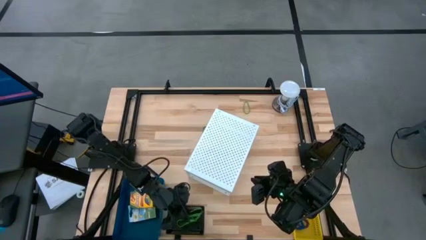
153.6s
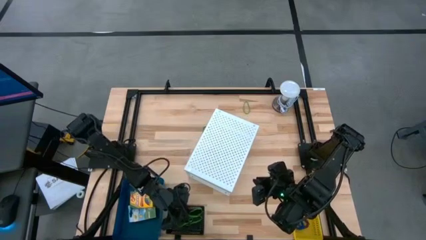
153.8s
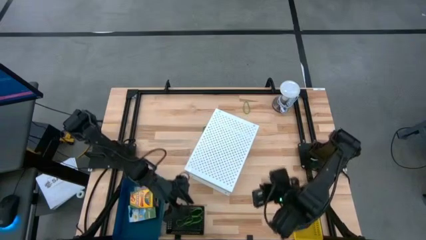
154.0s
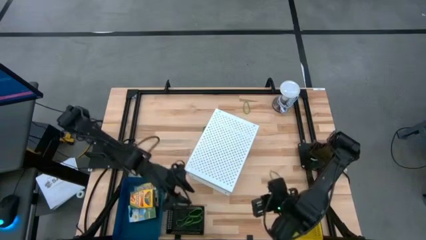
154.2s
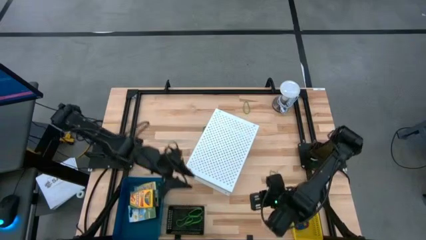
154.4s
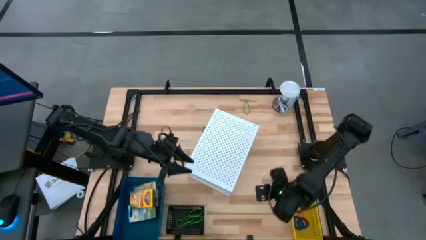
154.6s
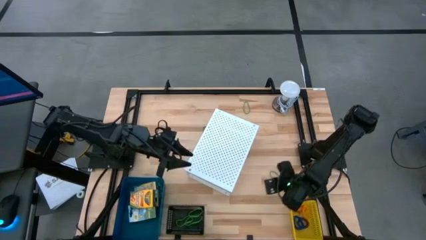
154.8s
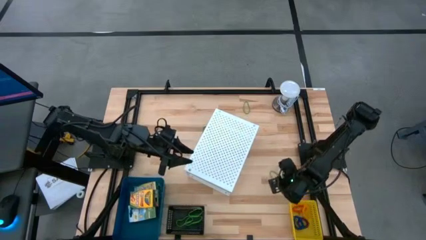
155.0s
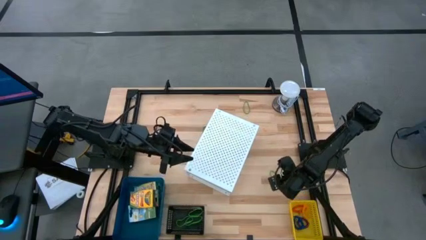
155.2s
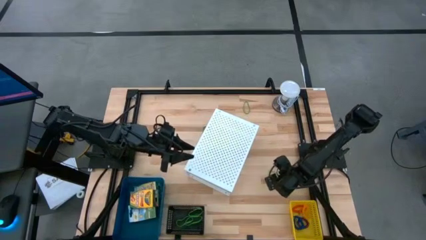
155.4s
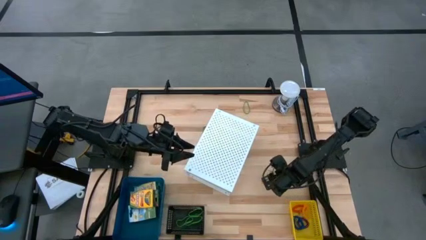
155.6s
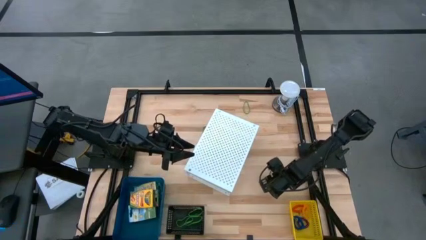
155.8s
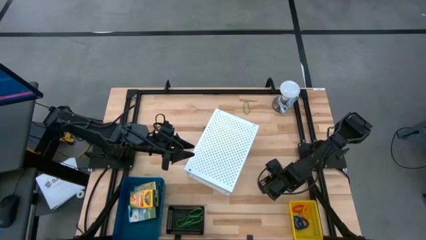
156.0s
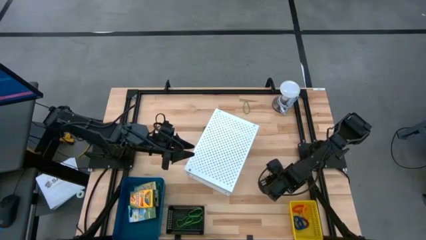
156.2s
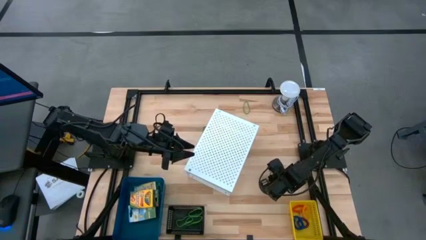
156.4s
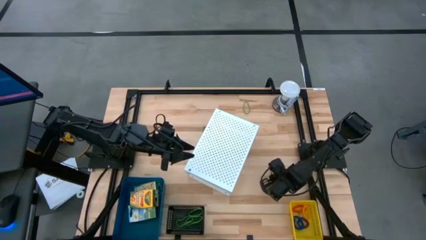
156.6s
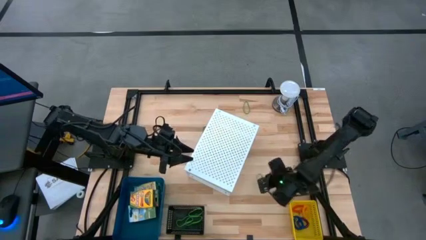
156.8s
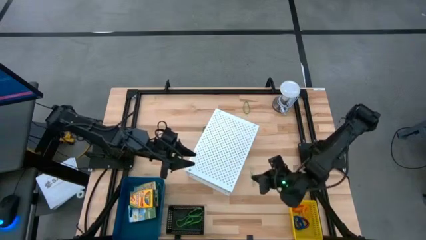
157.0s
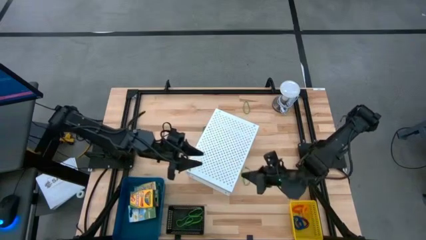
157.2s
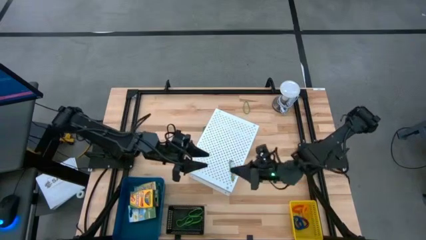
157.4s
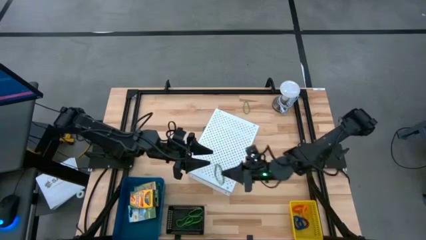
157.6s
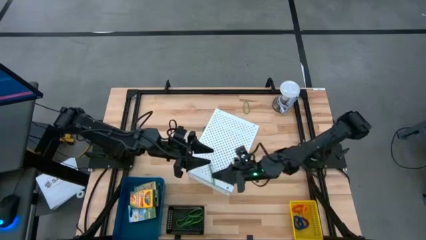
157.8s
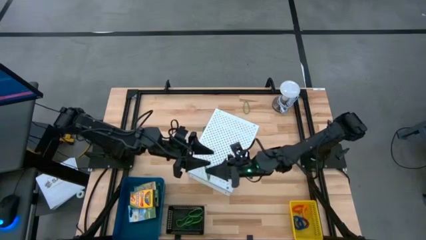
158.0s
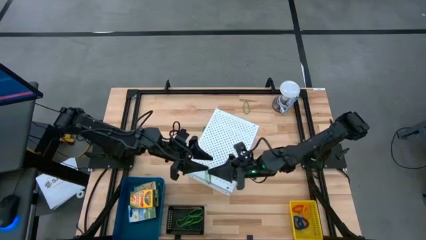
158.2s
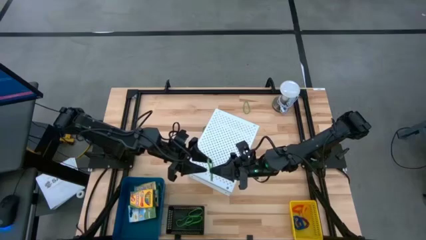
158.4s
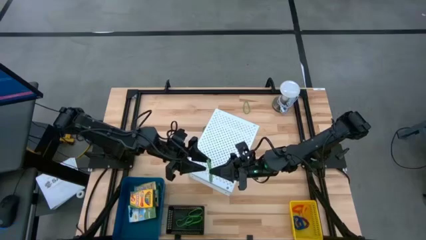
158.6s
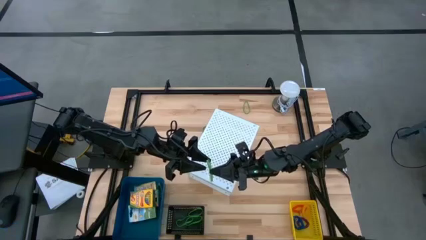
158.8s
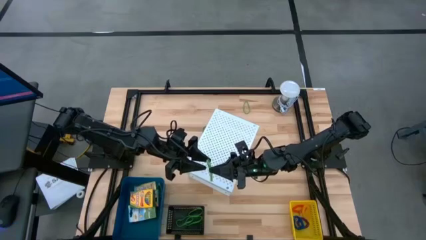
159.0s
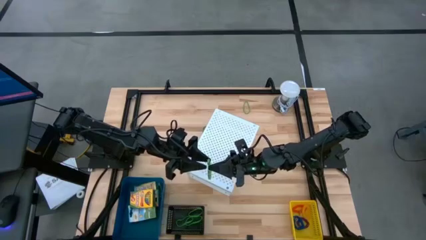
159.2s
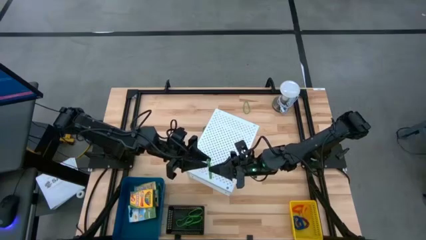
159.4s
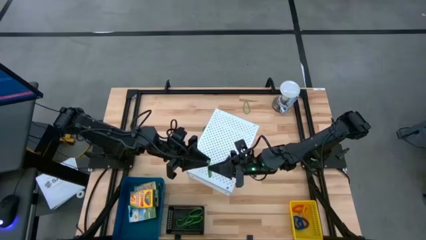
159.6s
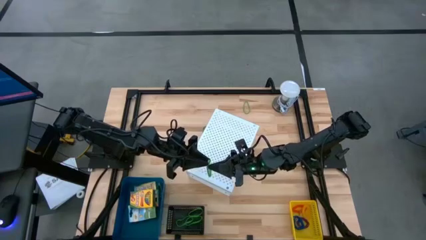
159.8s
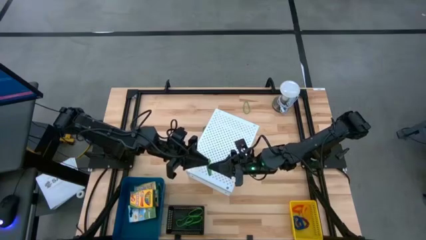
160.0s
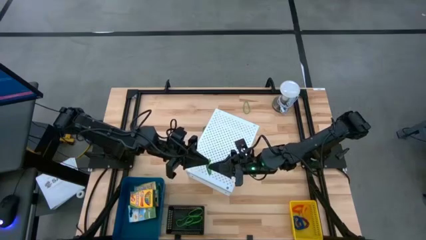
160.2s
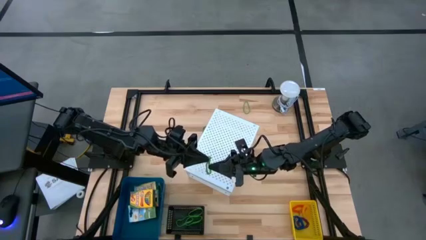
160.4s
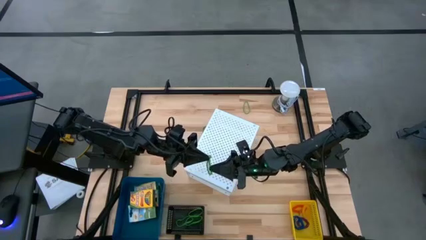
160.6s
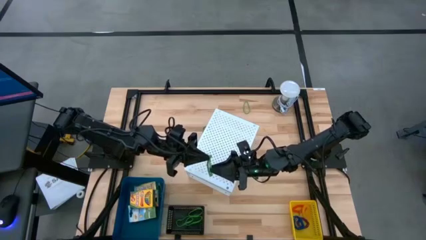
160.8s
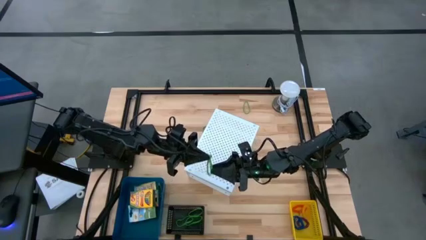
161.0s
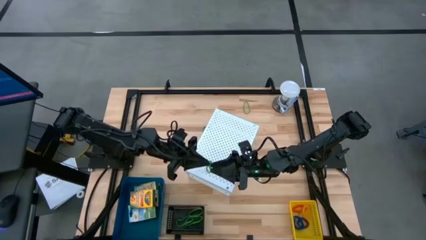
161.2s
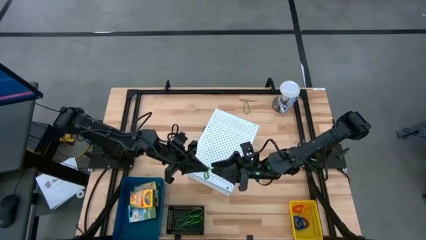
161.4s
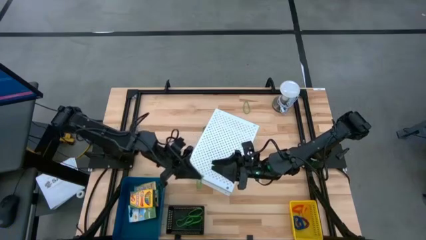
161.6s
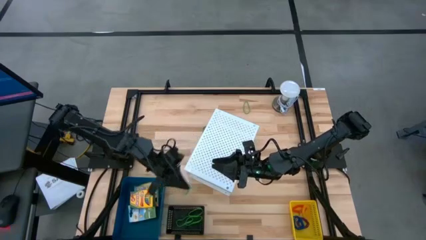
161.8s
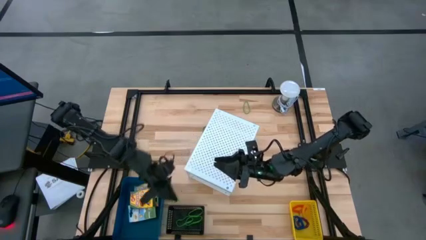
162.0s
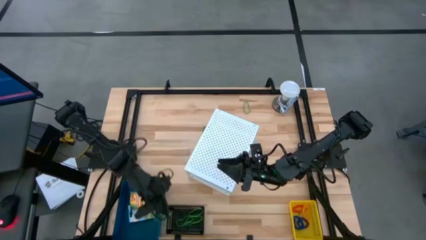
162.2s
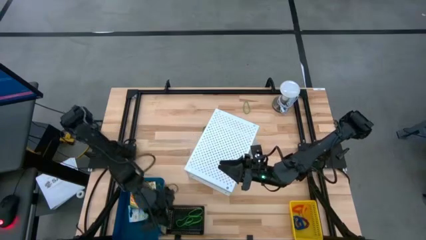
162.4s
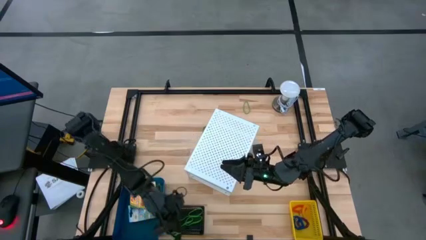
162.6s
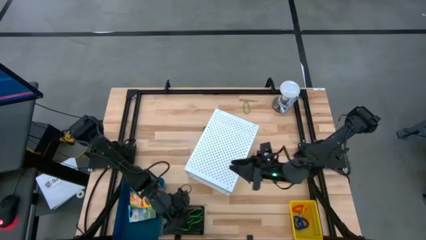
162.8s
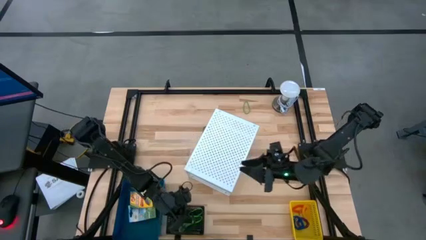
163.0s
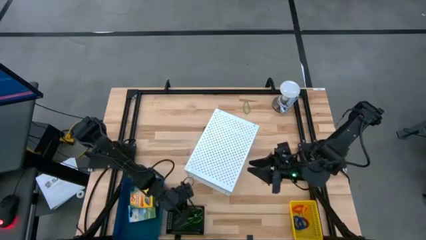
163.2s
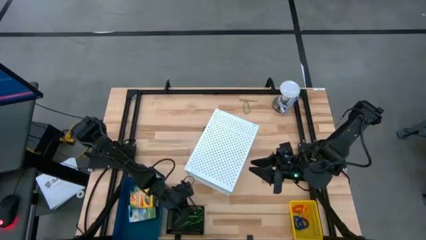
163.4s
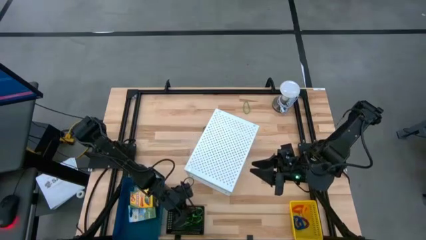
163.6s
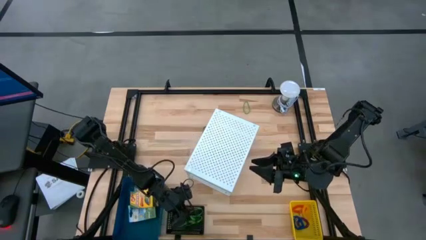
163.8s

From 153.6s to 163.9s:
Task: Pick & Place Office Desk Supplies
Put the green rubber band into the black bin

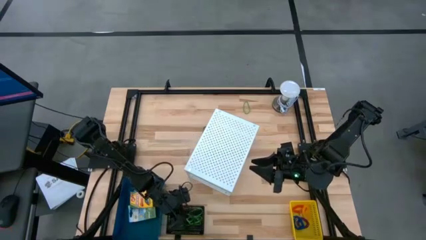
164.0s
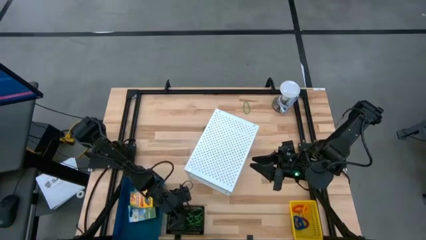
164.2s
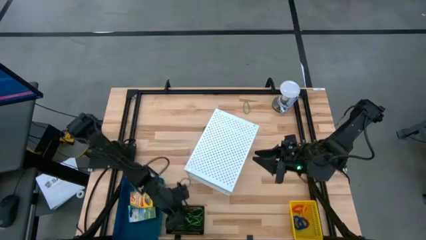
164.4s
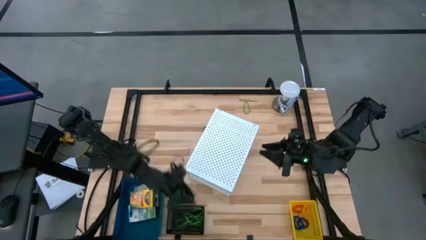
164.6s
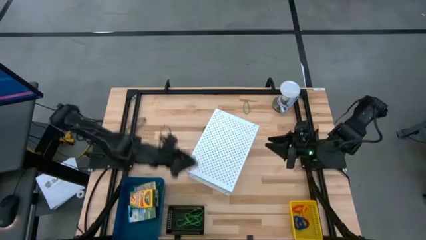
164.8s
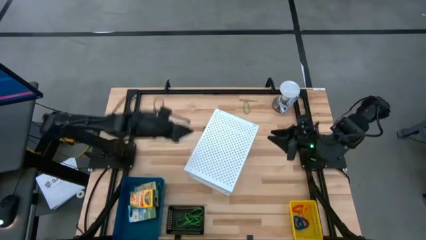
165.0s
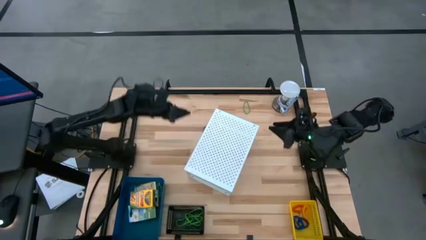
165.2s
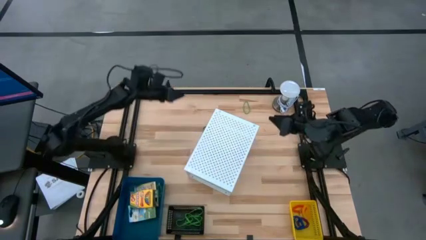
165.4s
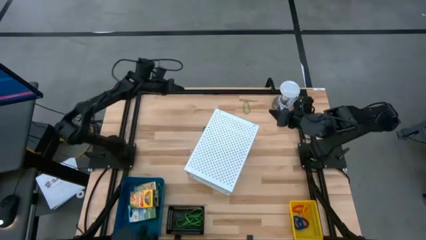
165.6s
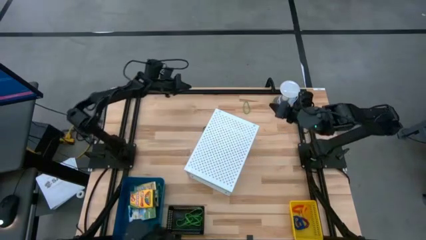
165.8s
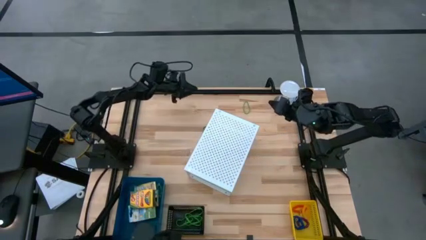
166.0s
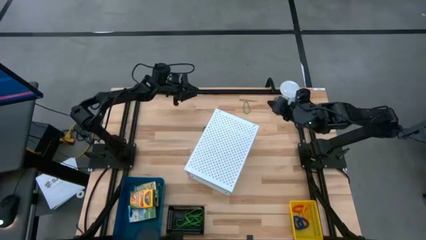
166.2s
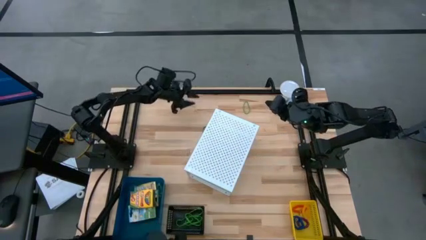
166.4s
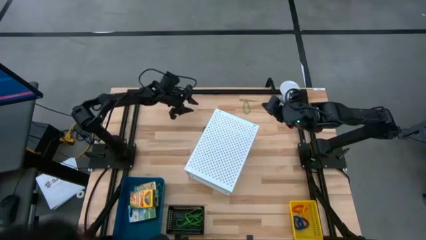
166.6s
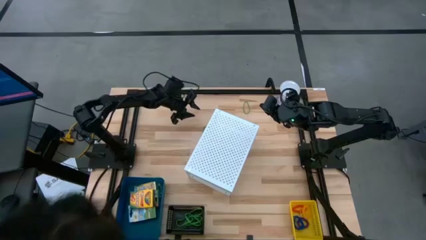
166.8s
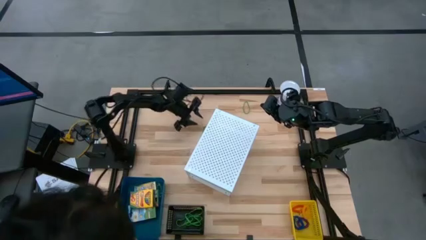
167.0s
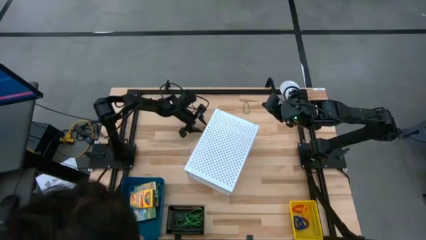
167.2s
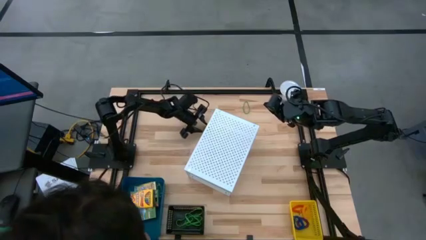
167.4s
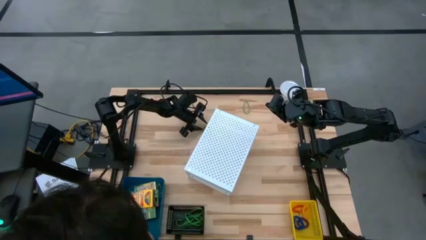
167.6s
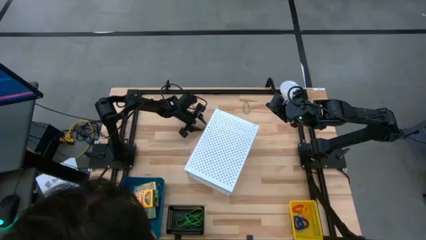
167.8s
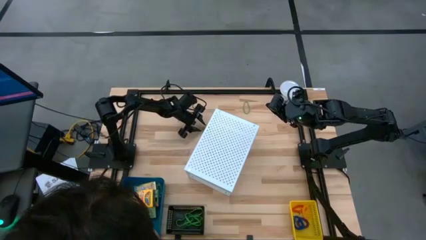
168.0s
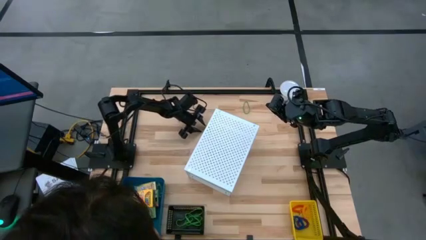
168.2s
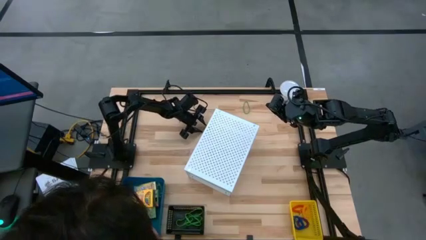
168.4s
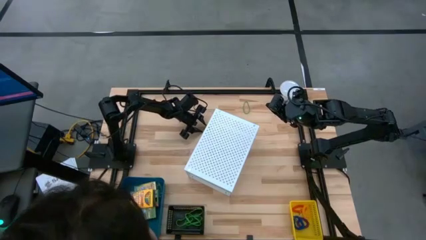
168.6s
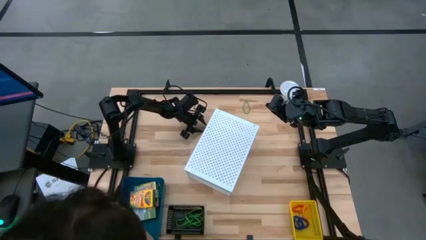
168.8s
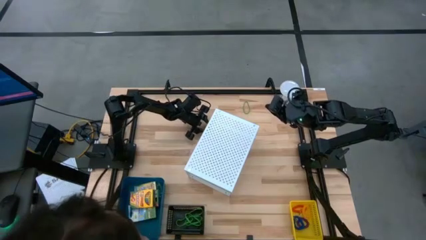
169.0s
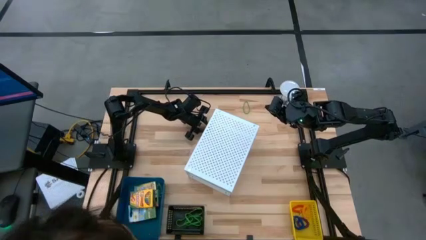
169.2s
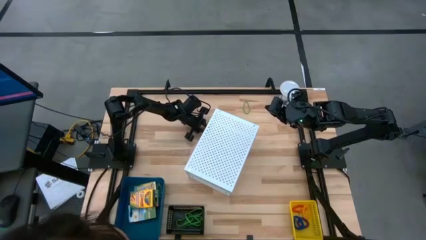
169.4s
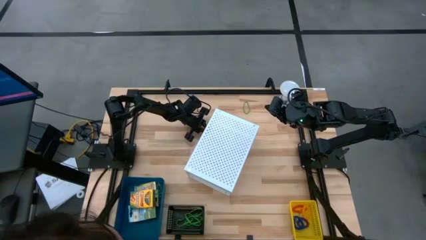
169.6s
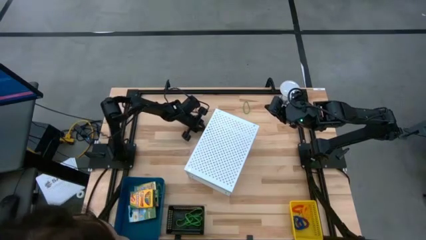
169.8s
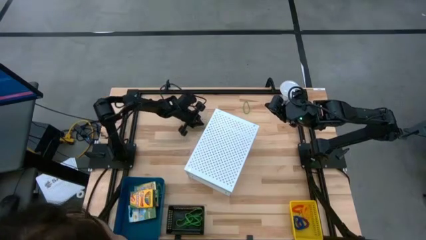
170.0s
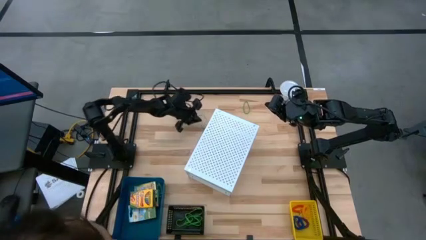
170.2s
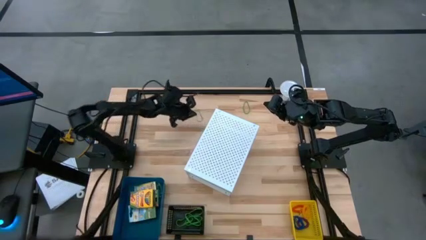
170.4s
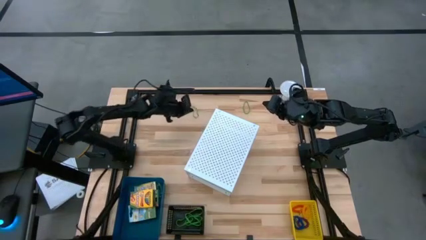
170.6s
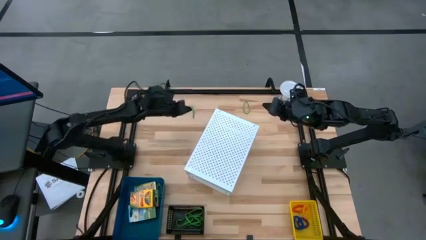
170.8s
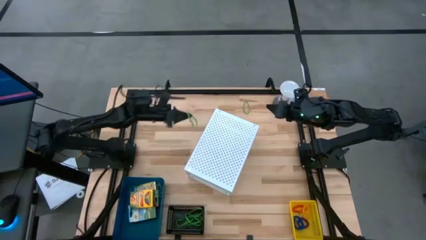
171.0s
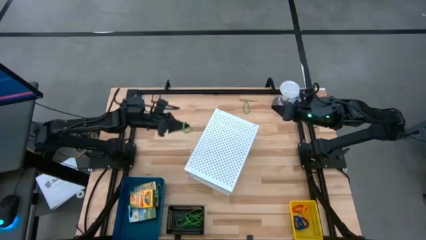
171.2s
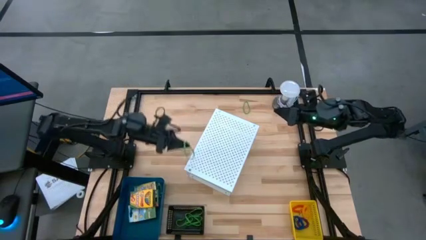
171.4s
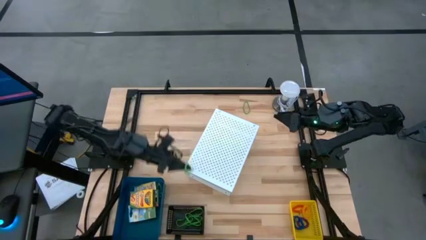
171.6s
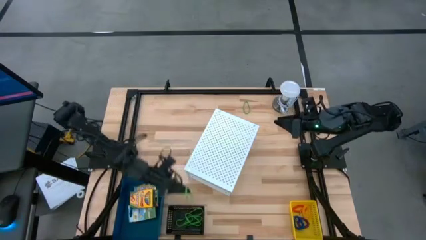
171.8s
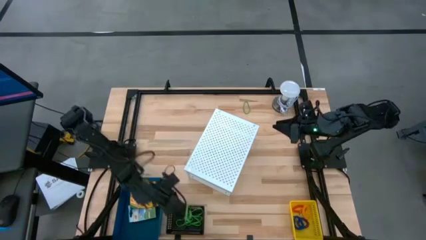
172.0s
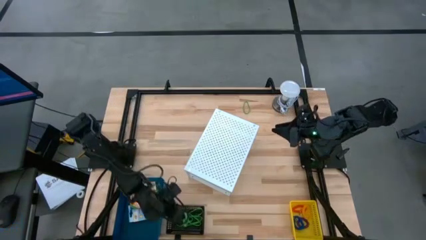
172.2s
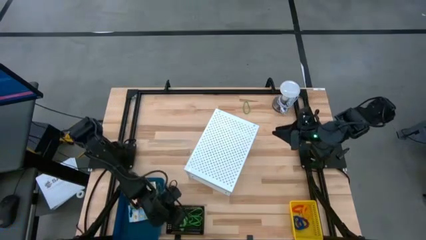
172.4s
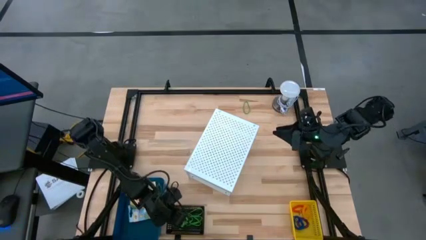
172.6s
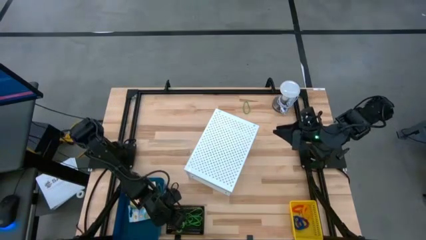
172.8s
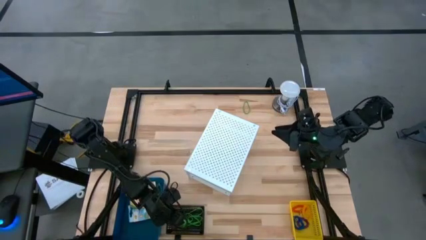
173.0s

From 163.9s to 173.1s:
Put the green rubber band into the black bin
